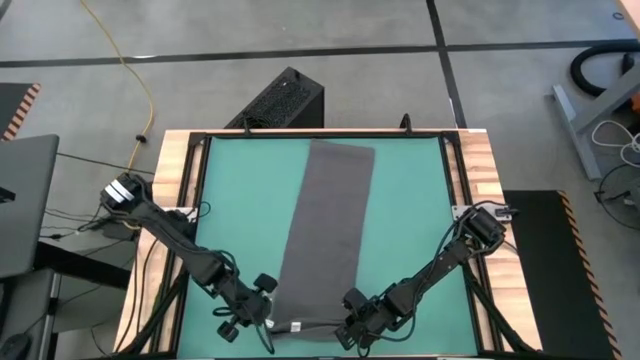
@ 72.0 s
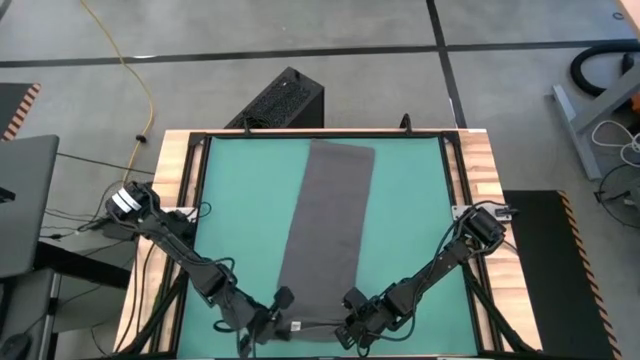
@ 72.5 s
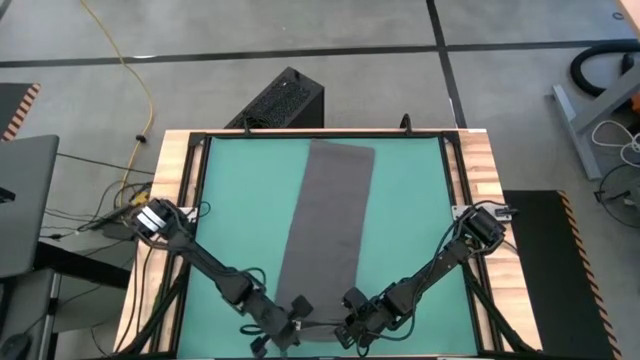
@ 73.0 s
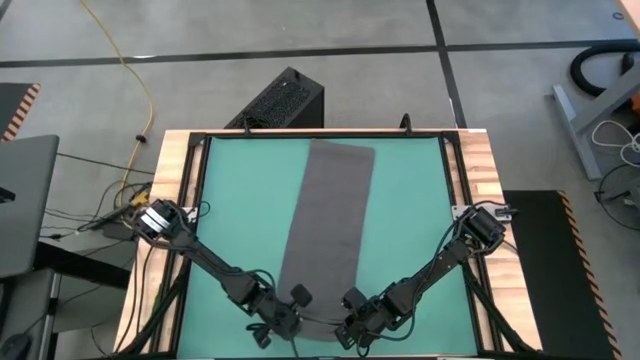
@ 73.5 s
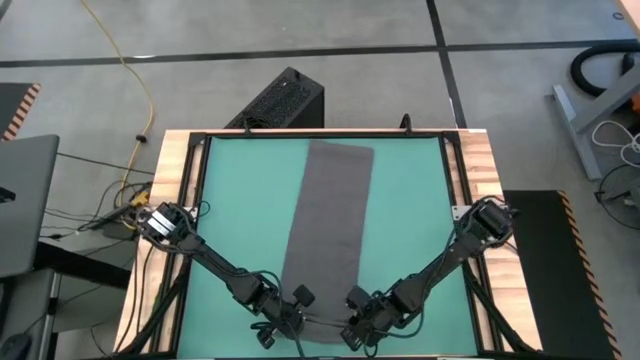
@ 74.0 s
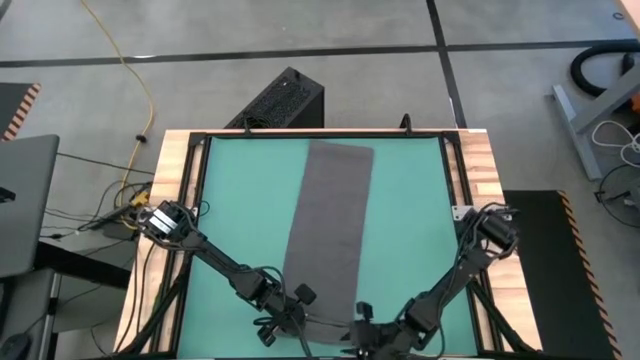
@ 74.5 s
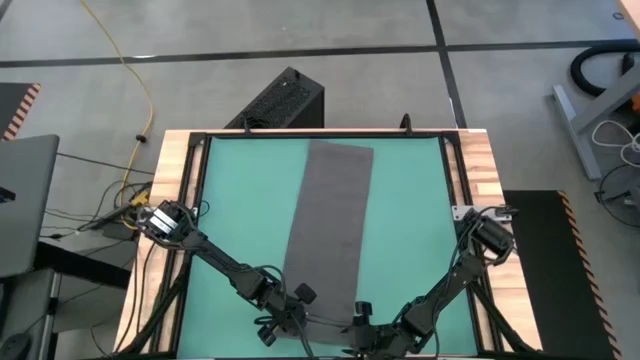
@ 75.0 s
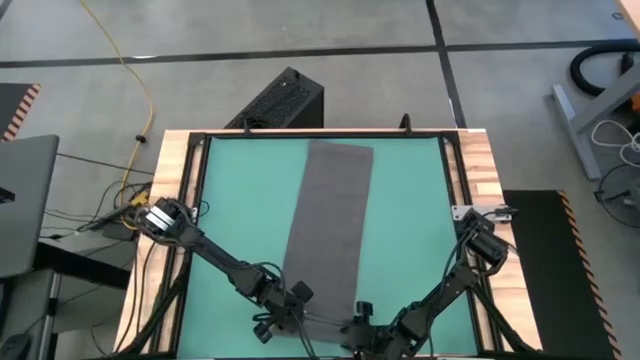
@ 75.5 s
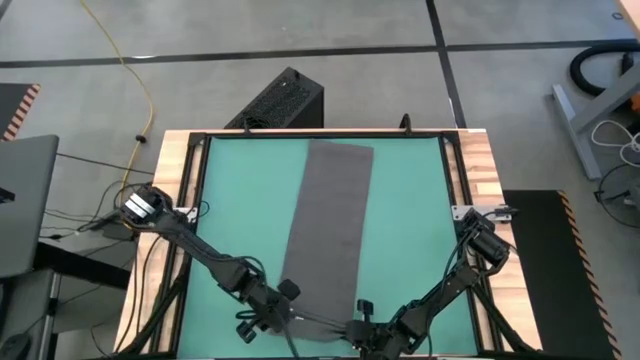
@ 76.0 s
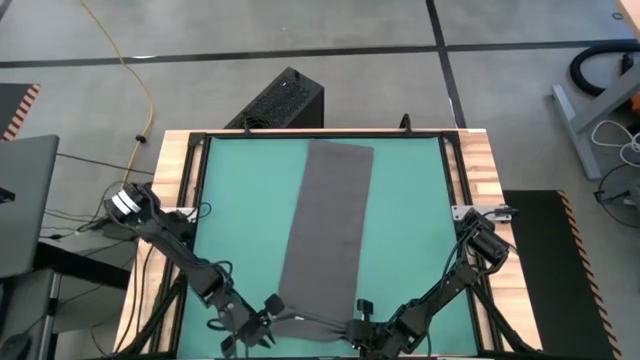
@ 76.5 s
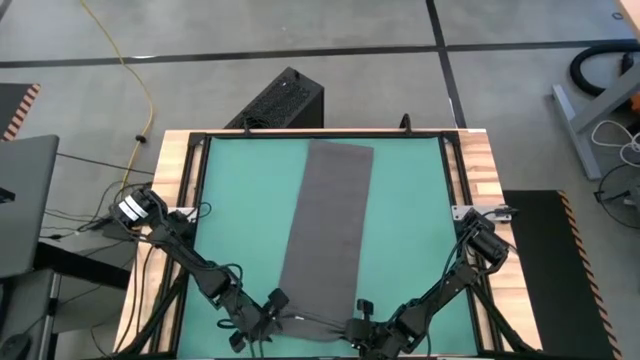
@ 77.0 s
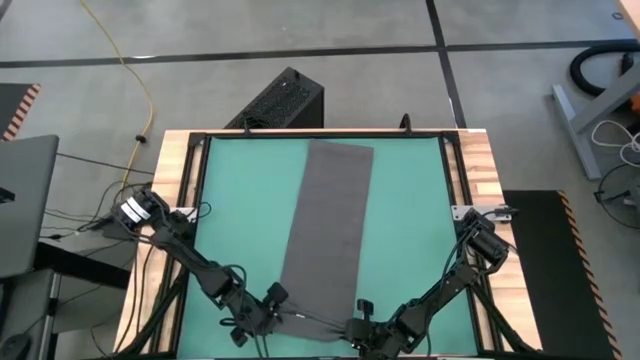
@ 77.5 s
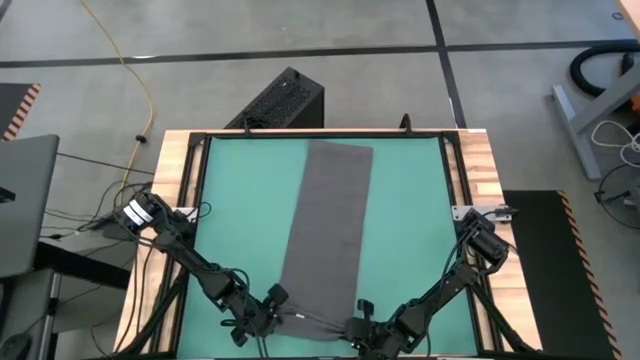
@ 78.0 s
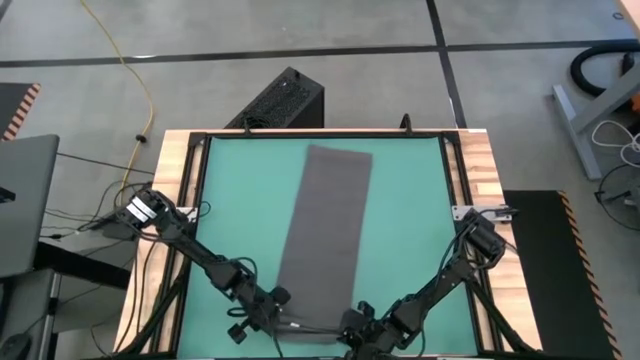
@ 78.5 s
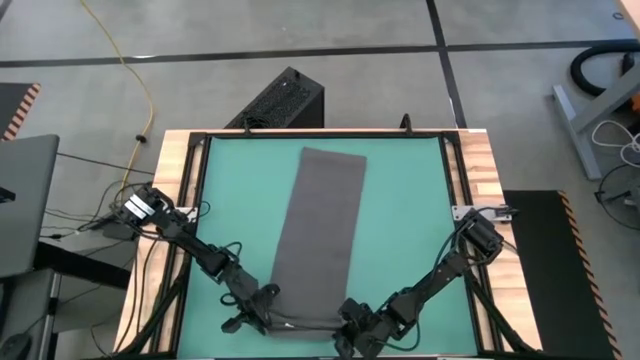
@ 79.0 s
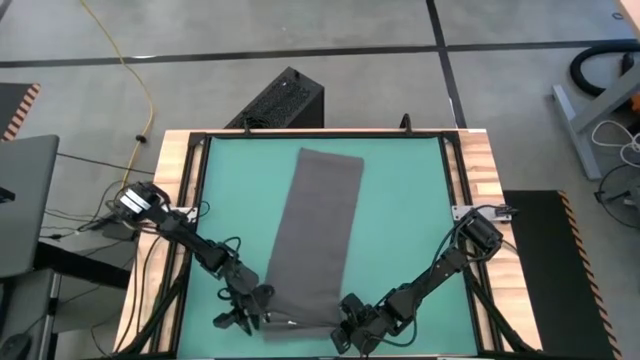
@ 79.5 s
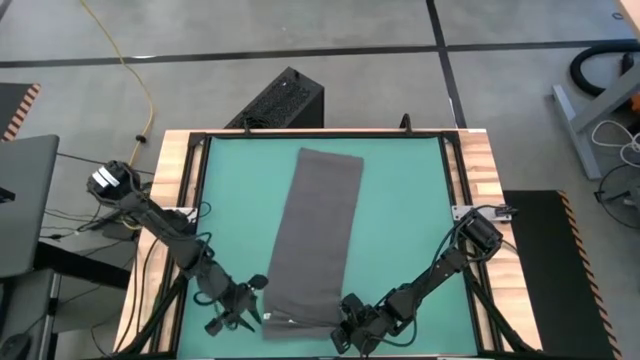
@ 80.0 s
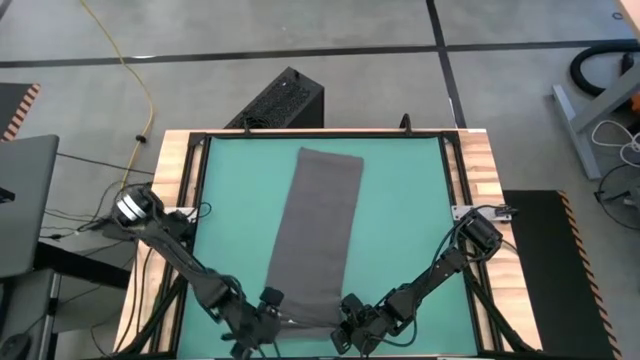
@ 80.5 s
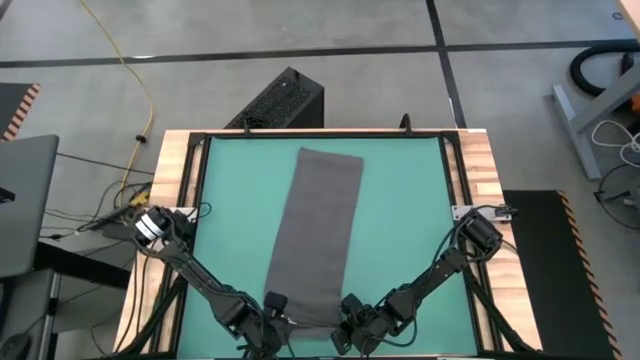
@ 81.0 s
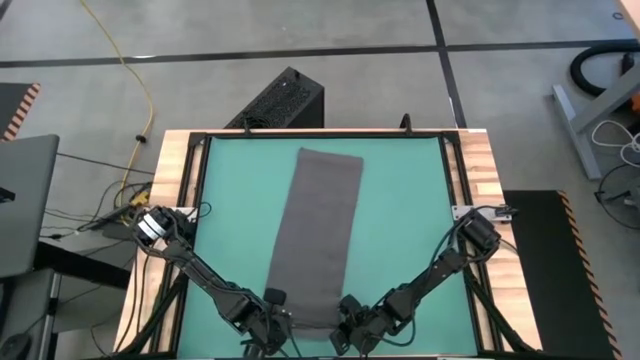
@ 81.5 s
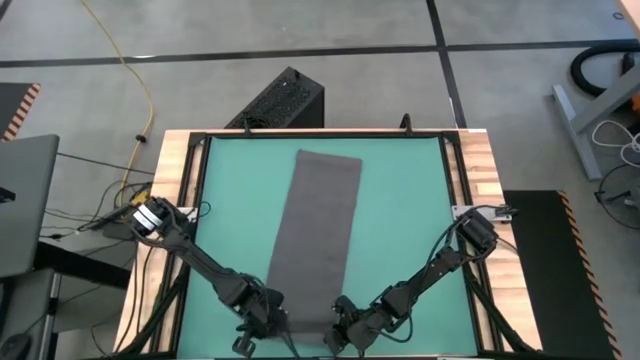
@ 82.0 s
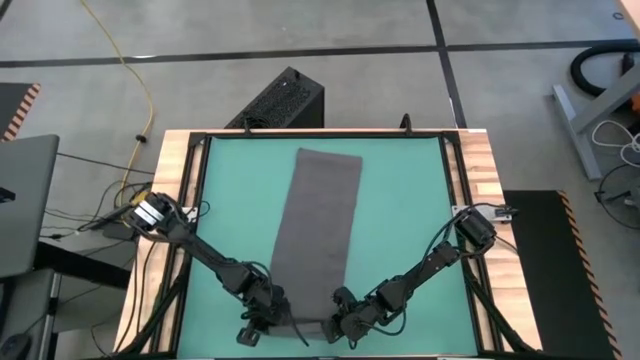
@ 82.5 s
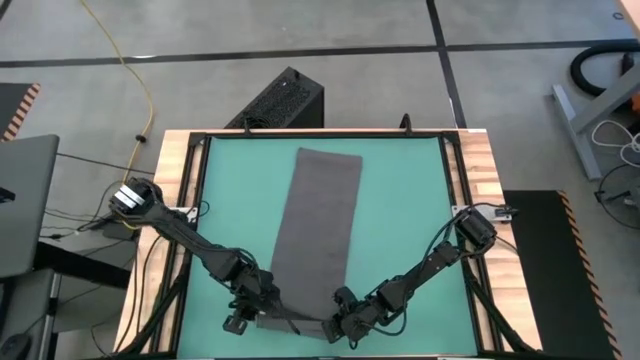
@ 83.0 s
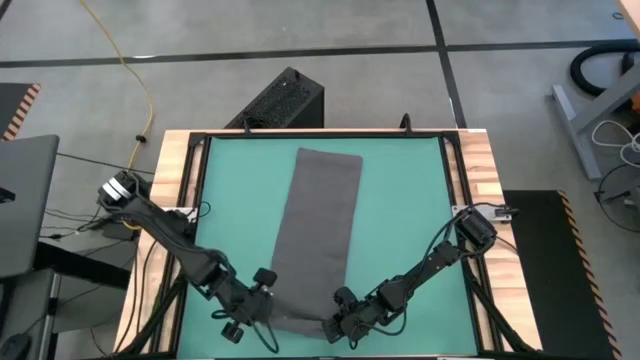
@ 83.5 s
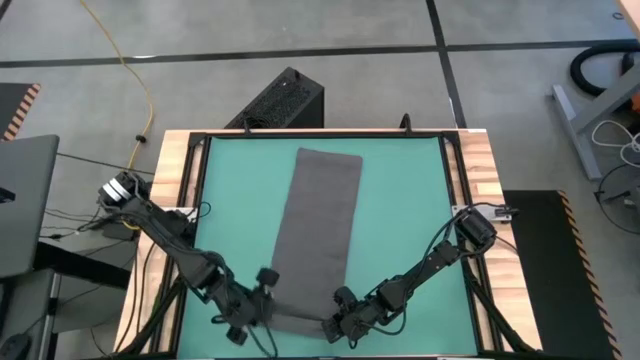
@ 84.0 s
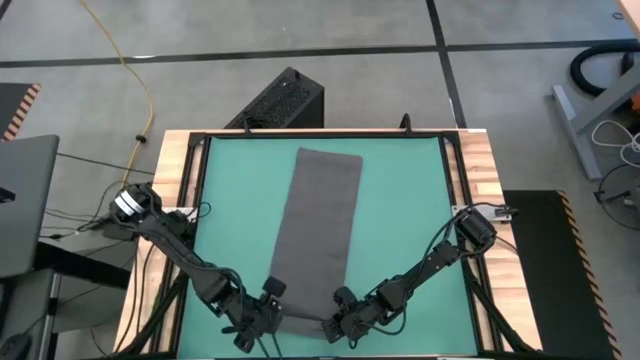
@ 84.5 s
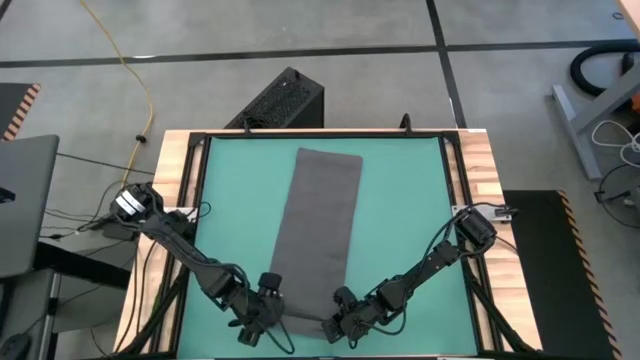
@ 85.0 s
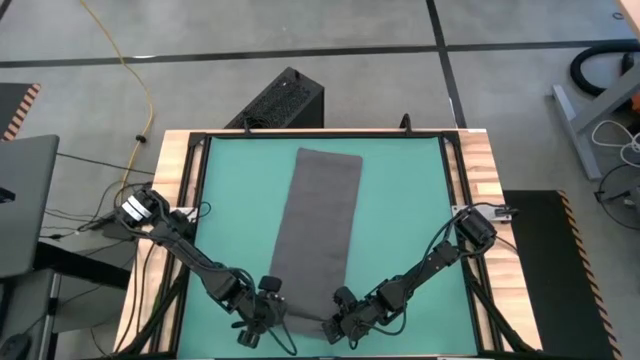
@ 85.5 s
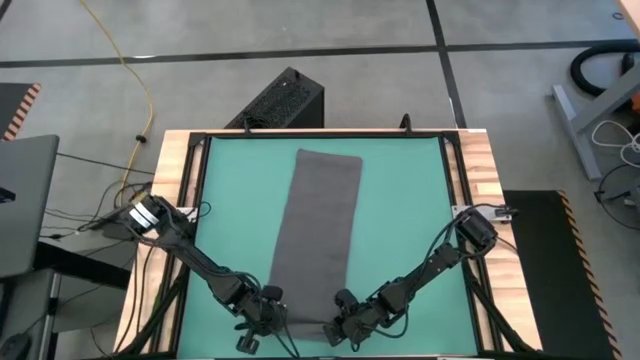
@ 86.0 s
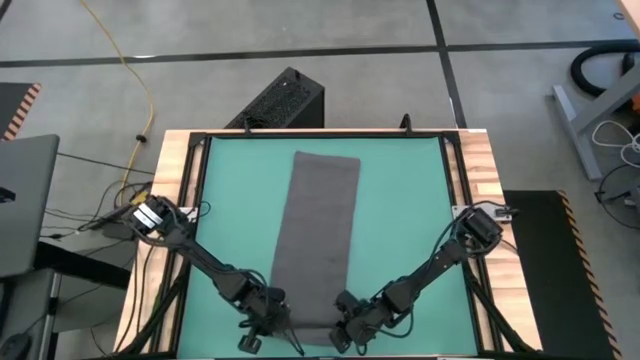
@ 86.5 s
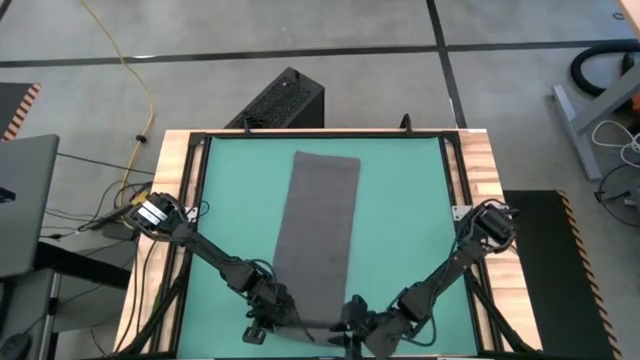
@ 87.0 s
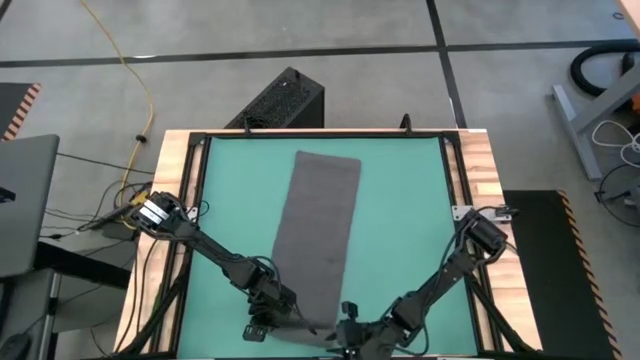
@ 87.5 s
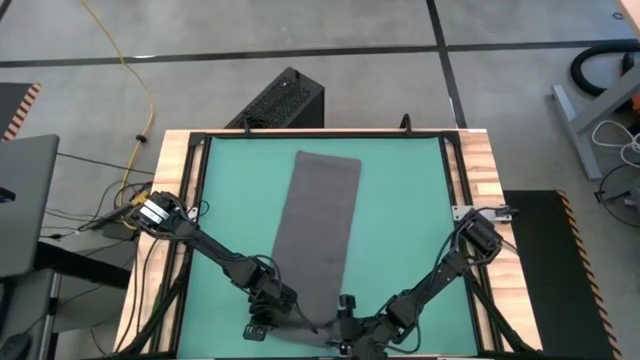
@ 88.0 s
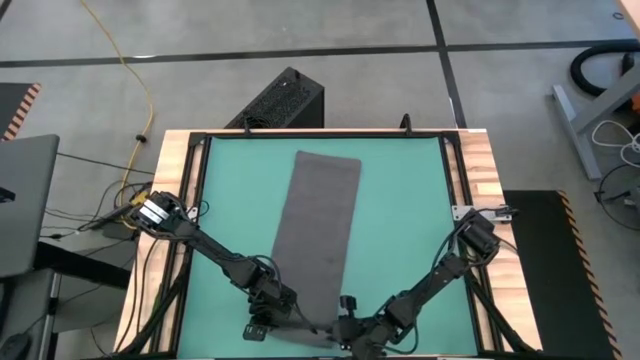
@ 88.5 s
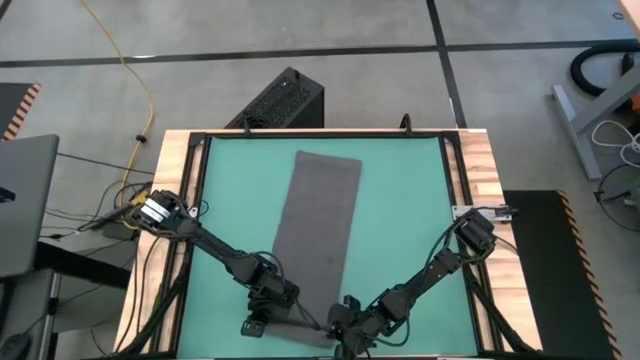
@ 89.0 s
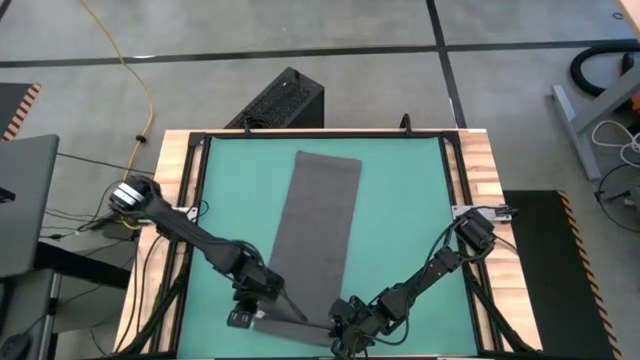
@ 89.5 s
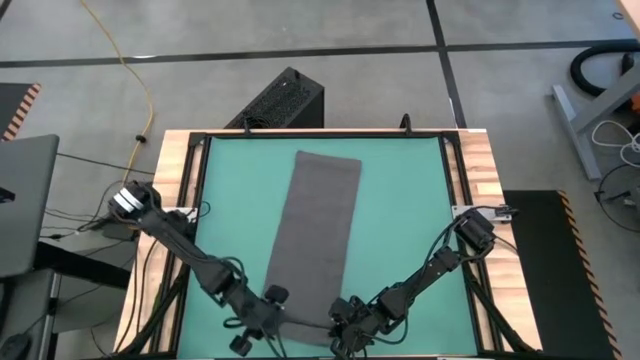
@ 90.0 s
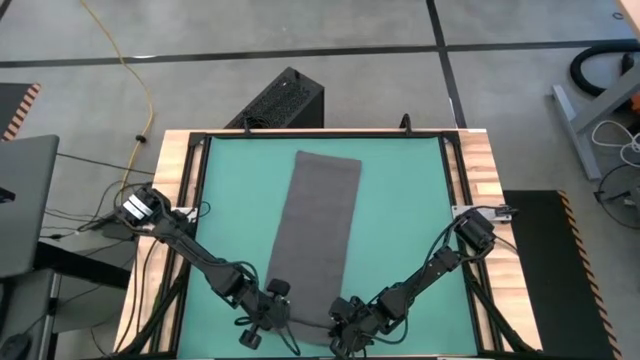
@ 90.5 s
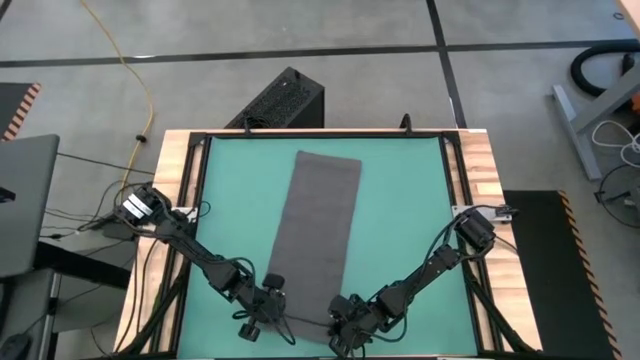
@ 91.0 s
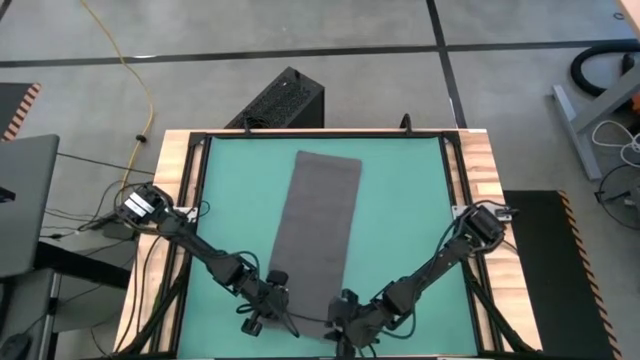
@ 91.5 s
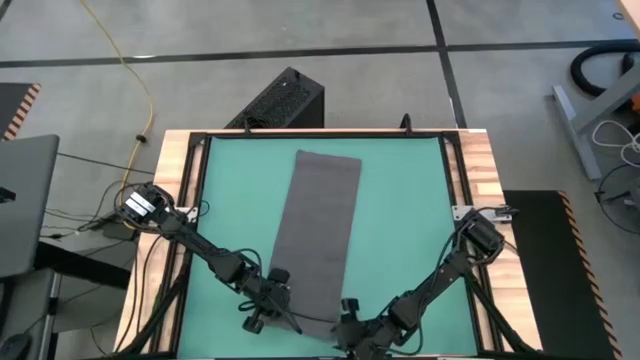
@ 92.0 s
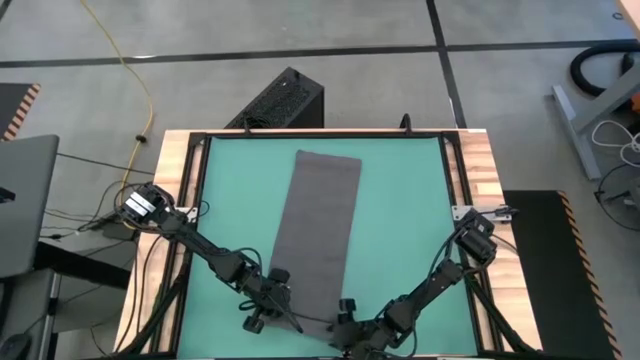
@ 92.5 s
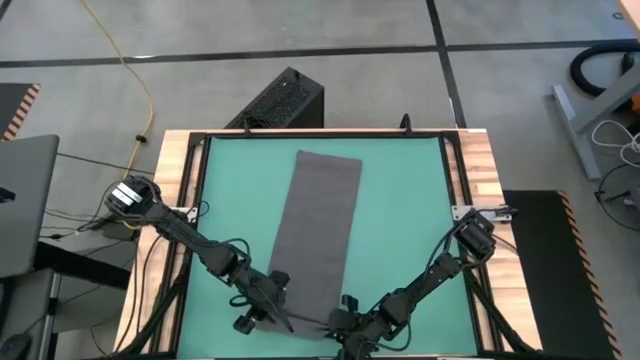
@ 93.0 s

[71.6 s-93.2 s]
Task: Roll towel
Roll the gray towel

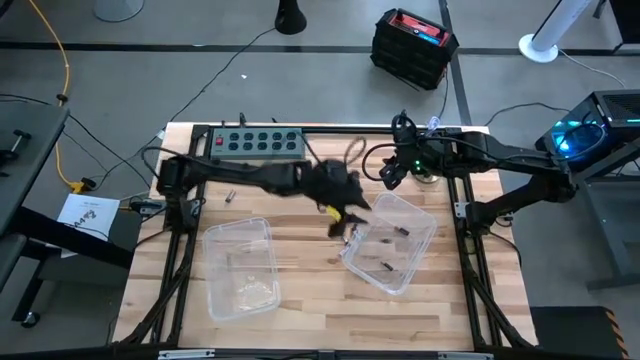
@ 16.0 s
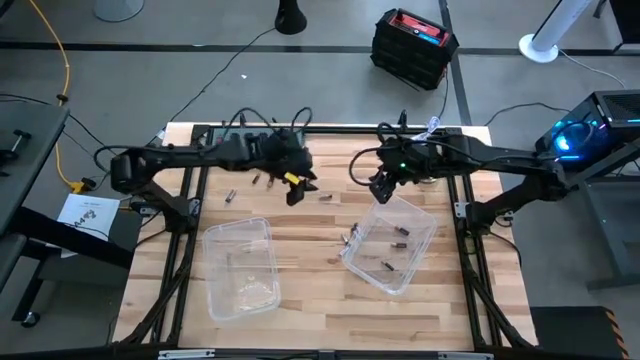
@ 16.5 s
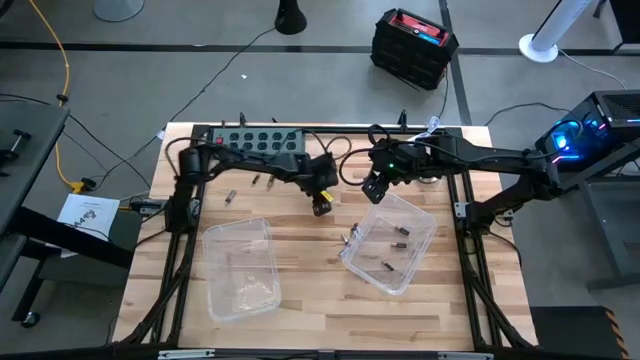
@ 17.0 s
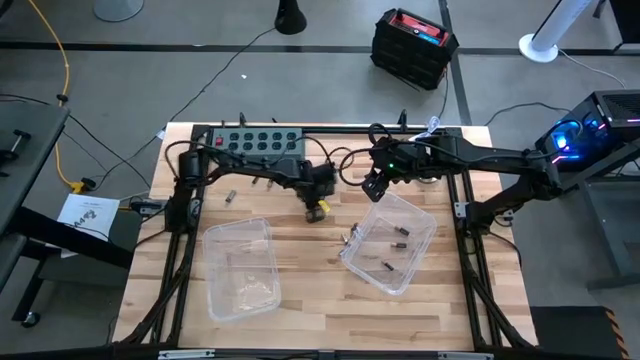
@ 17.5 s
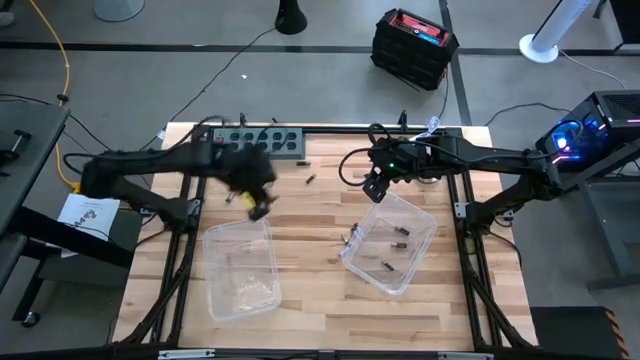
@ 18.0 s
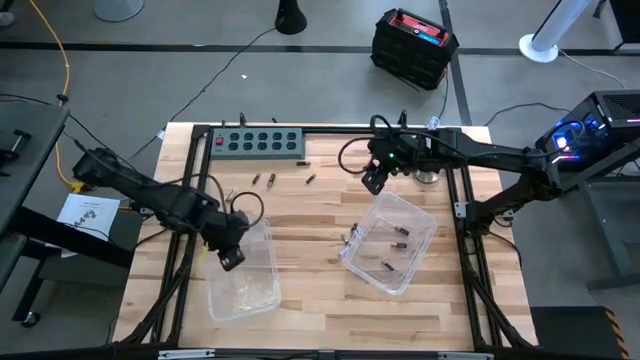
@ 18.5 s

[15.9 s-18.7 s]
Task: Sort batteries
Put the silver battery into the left transparent bin
